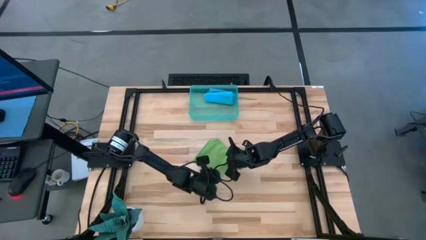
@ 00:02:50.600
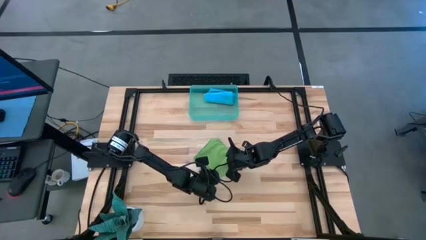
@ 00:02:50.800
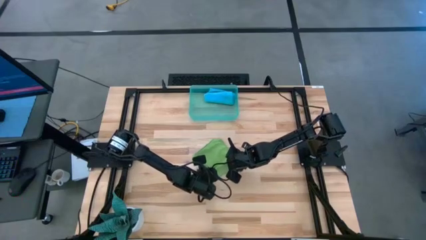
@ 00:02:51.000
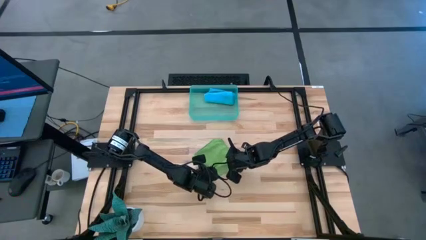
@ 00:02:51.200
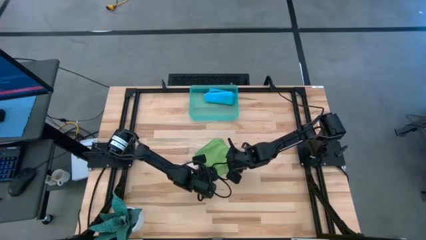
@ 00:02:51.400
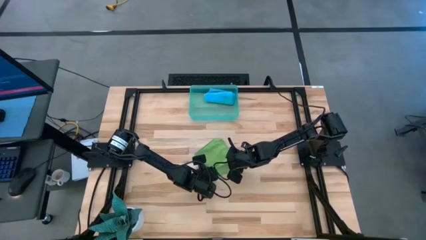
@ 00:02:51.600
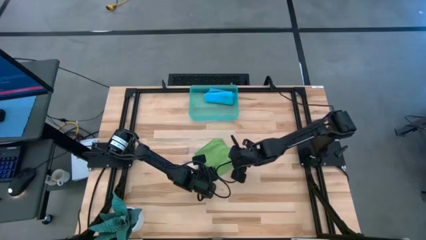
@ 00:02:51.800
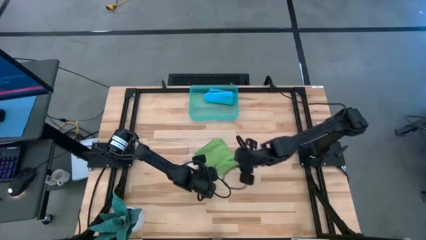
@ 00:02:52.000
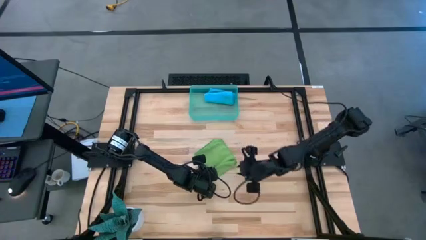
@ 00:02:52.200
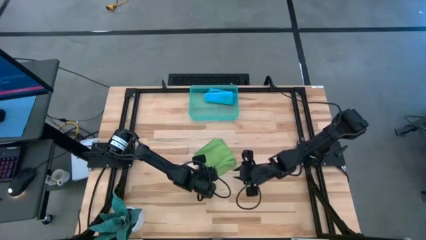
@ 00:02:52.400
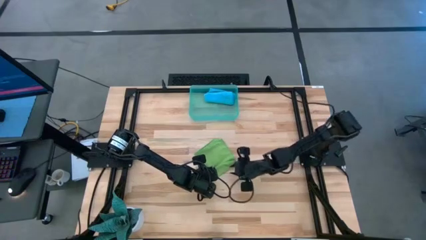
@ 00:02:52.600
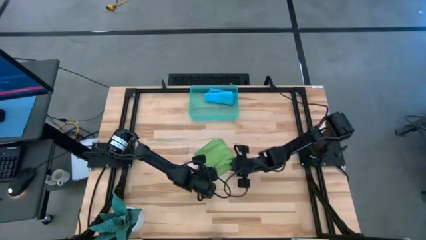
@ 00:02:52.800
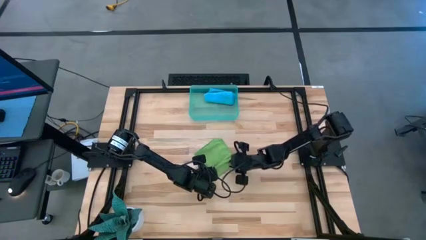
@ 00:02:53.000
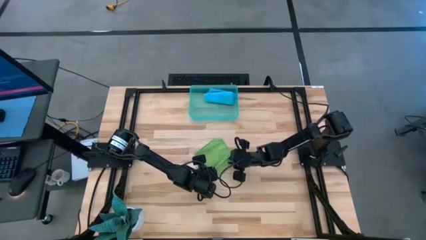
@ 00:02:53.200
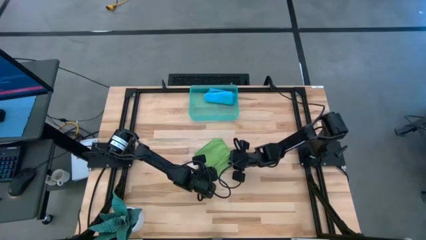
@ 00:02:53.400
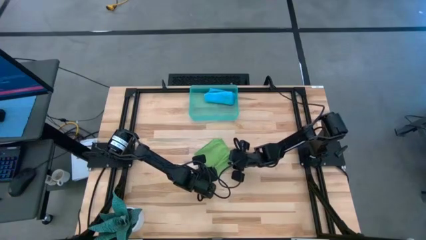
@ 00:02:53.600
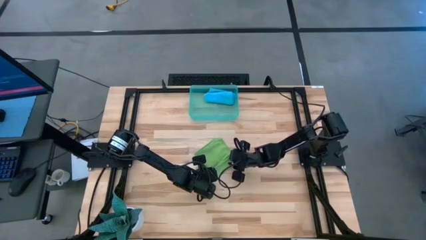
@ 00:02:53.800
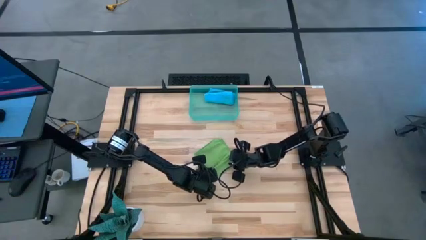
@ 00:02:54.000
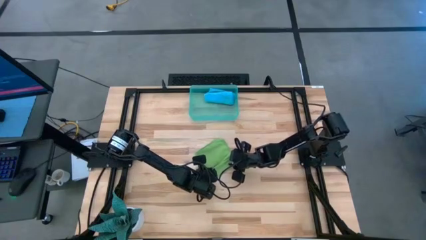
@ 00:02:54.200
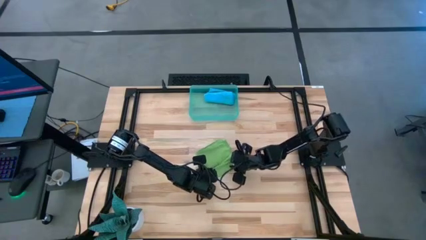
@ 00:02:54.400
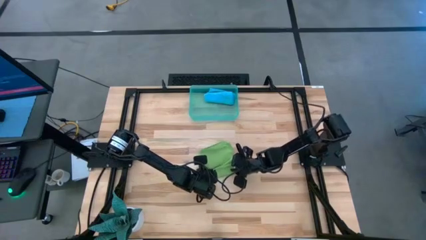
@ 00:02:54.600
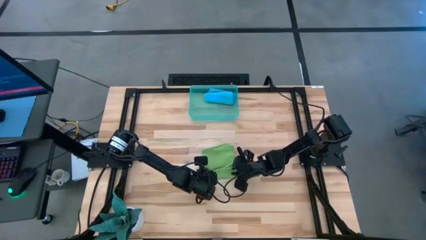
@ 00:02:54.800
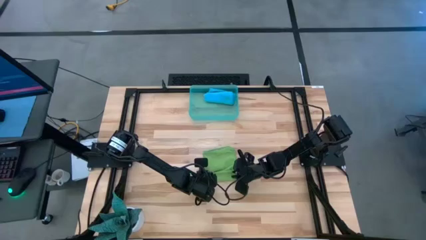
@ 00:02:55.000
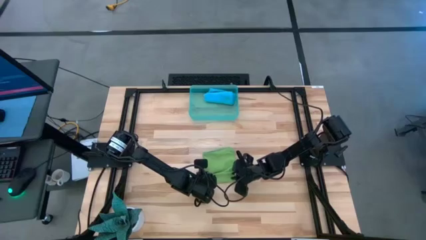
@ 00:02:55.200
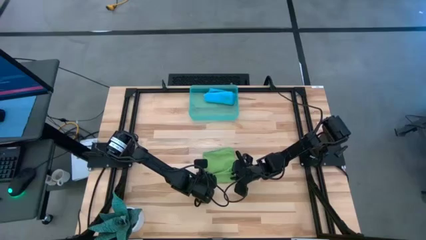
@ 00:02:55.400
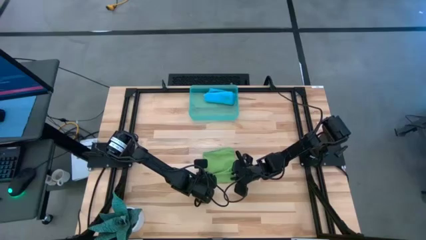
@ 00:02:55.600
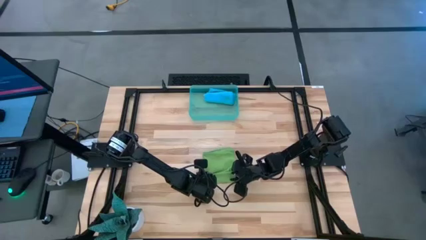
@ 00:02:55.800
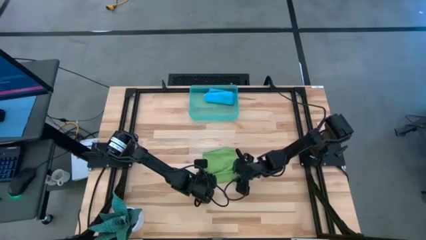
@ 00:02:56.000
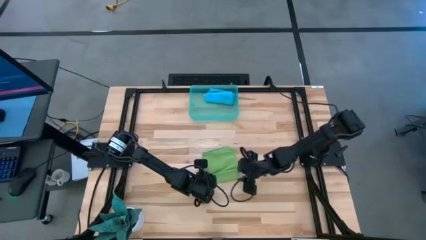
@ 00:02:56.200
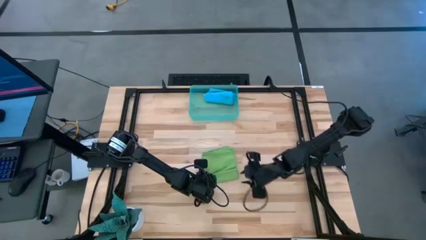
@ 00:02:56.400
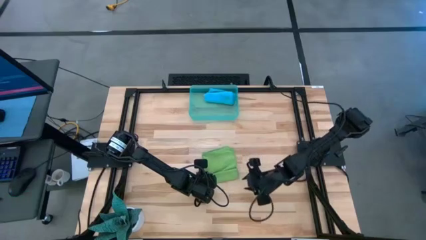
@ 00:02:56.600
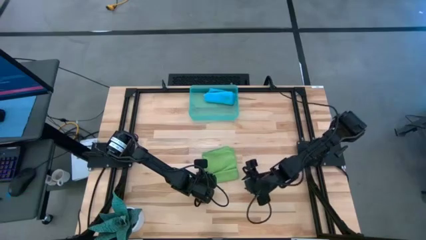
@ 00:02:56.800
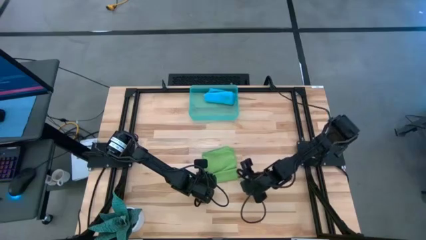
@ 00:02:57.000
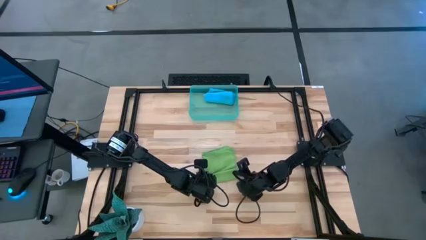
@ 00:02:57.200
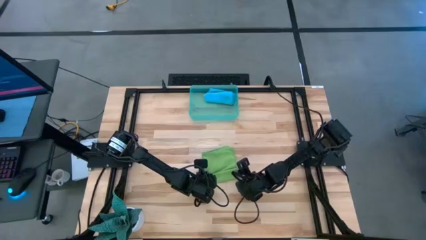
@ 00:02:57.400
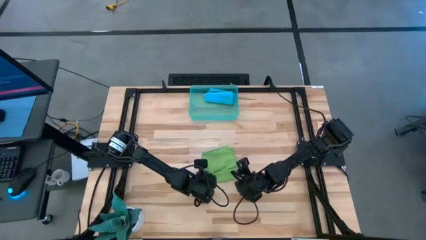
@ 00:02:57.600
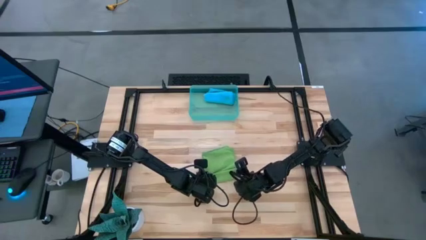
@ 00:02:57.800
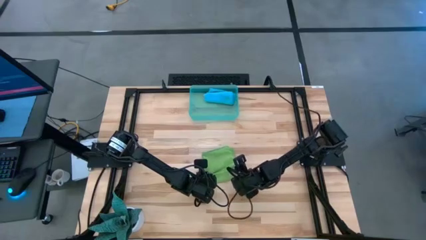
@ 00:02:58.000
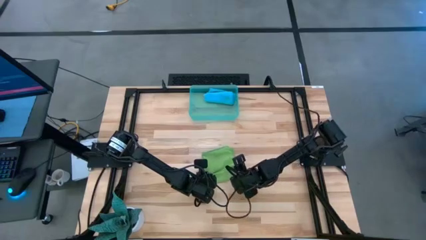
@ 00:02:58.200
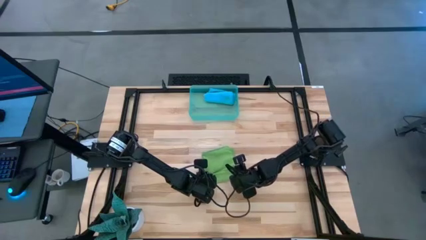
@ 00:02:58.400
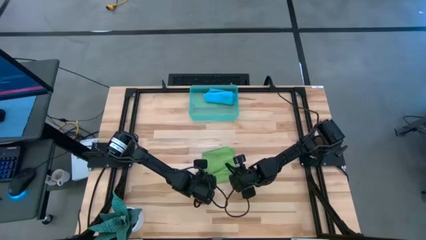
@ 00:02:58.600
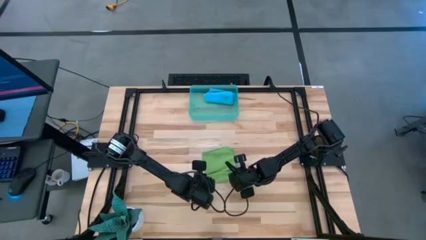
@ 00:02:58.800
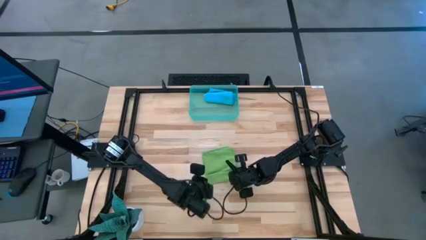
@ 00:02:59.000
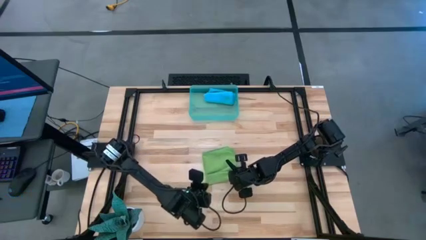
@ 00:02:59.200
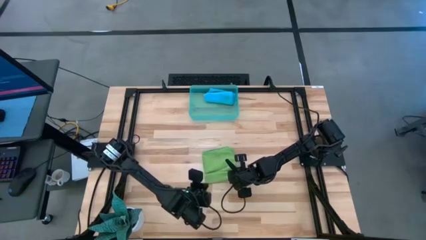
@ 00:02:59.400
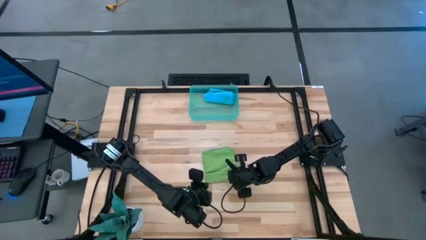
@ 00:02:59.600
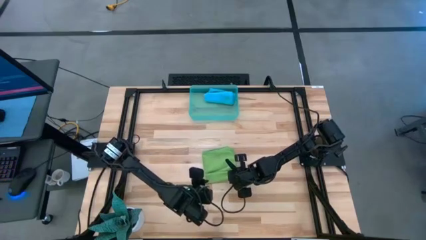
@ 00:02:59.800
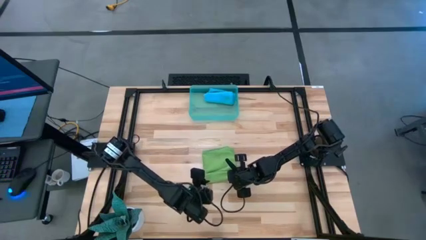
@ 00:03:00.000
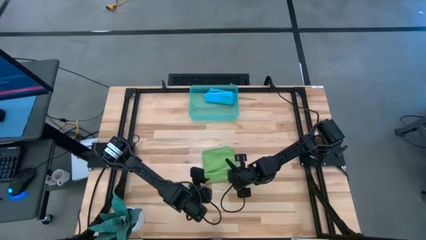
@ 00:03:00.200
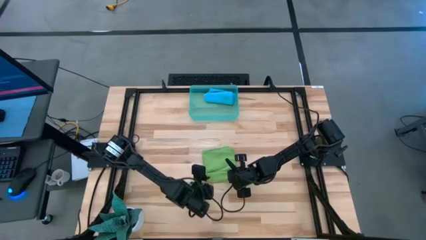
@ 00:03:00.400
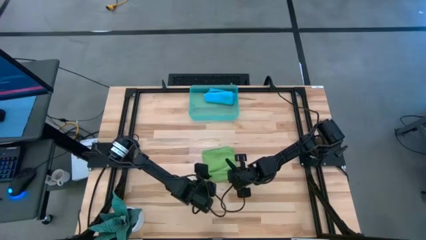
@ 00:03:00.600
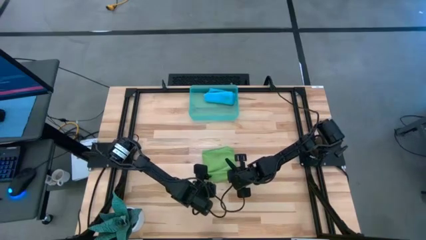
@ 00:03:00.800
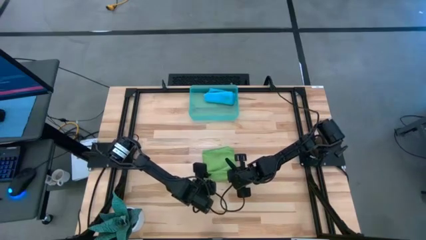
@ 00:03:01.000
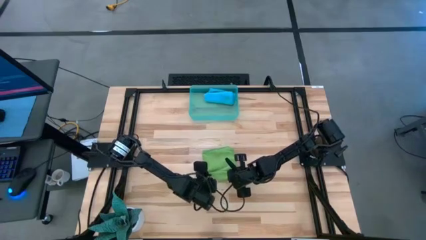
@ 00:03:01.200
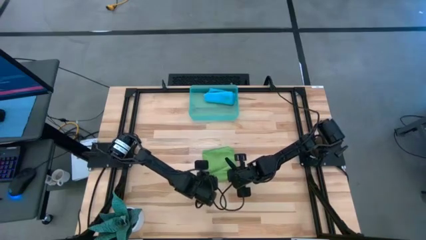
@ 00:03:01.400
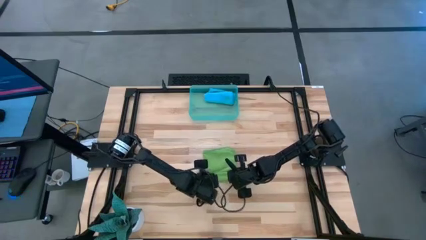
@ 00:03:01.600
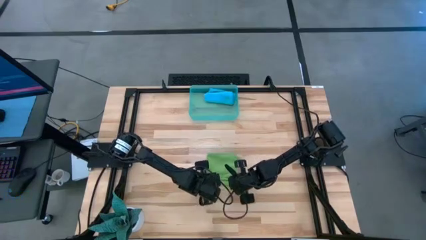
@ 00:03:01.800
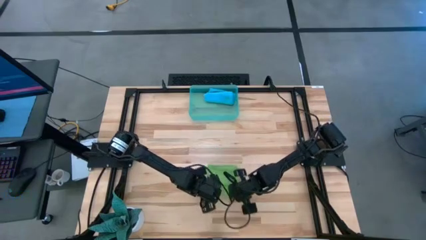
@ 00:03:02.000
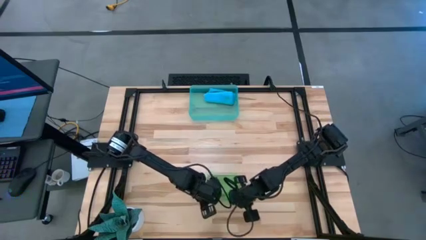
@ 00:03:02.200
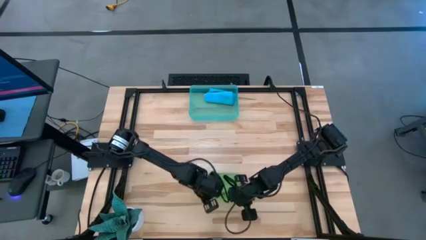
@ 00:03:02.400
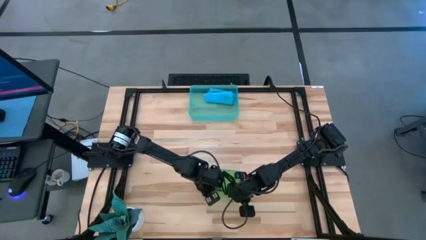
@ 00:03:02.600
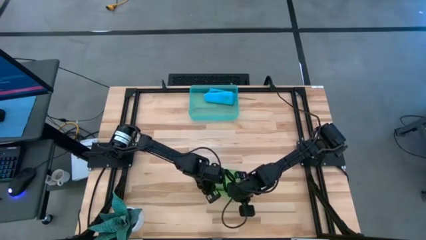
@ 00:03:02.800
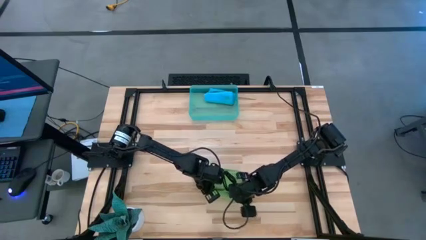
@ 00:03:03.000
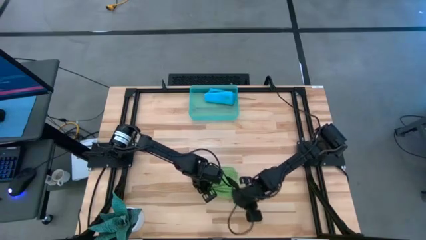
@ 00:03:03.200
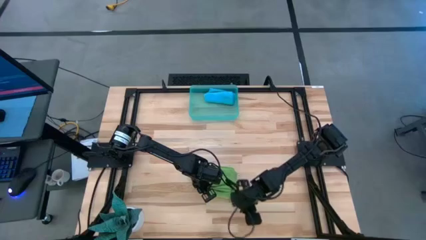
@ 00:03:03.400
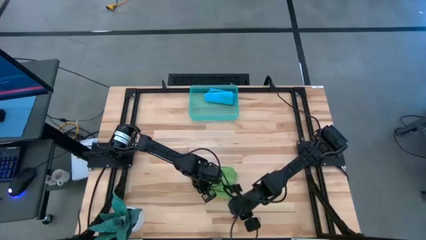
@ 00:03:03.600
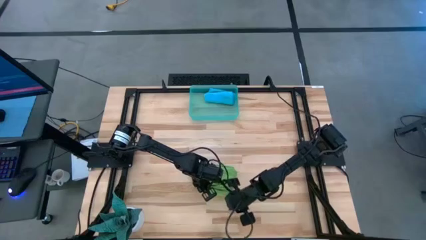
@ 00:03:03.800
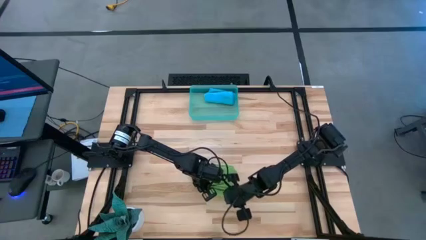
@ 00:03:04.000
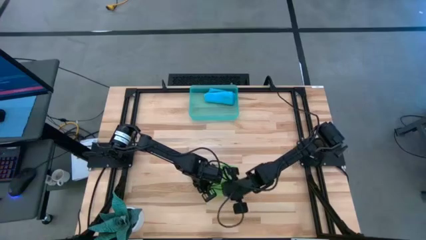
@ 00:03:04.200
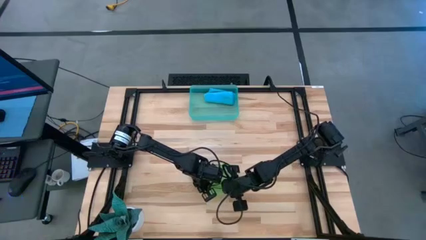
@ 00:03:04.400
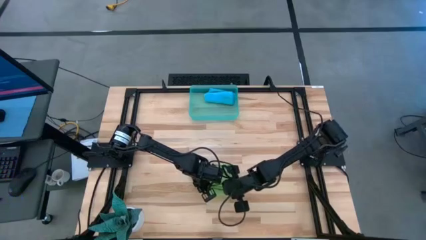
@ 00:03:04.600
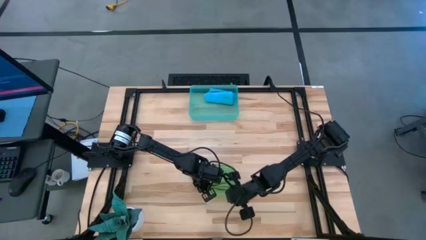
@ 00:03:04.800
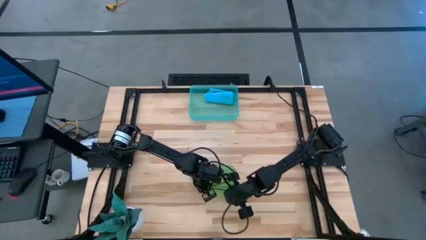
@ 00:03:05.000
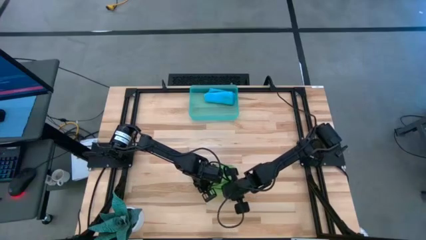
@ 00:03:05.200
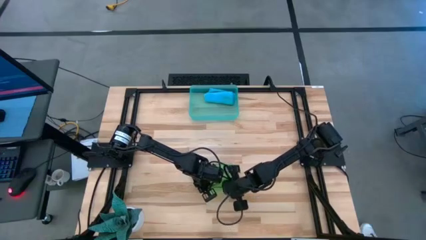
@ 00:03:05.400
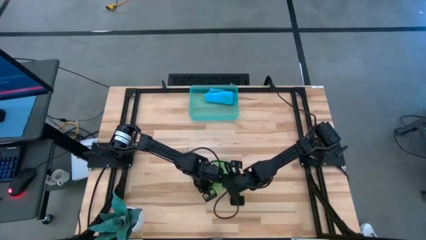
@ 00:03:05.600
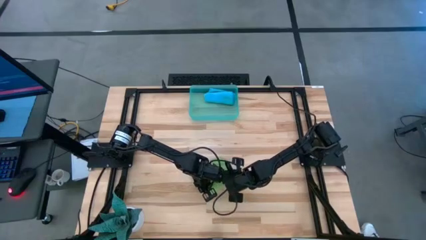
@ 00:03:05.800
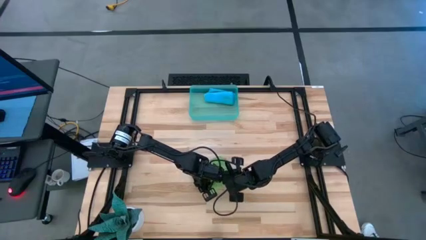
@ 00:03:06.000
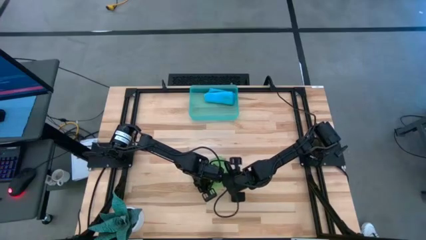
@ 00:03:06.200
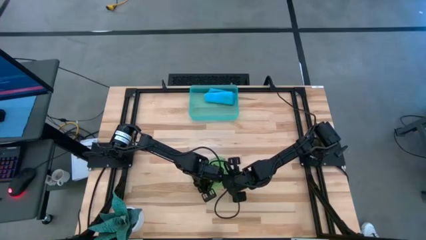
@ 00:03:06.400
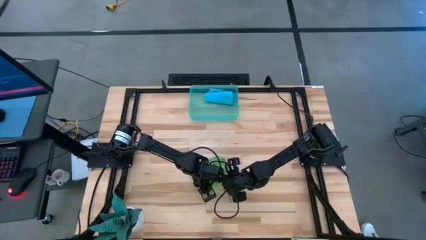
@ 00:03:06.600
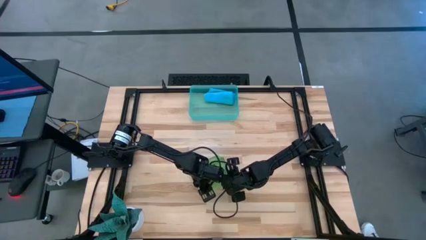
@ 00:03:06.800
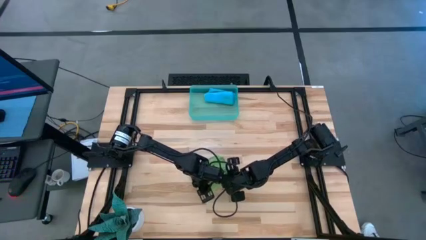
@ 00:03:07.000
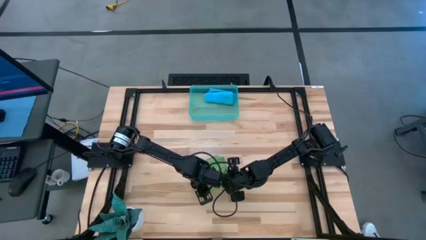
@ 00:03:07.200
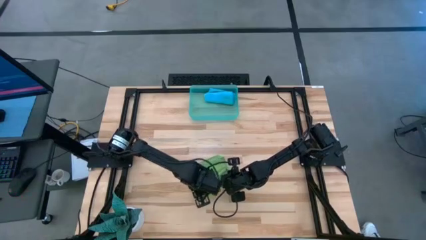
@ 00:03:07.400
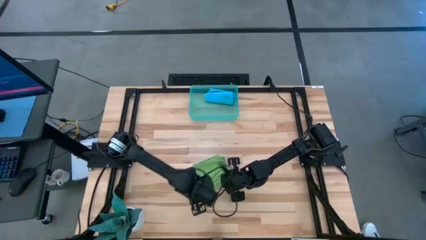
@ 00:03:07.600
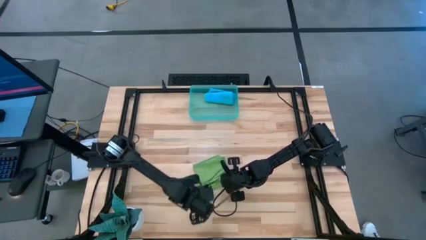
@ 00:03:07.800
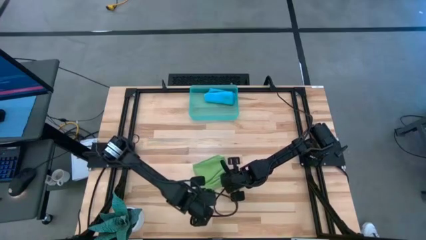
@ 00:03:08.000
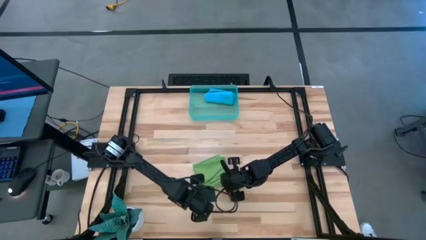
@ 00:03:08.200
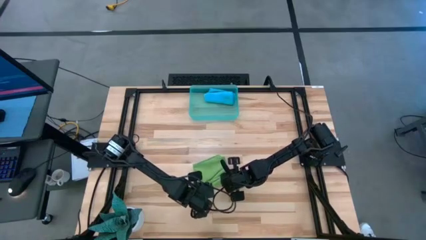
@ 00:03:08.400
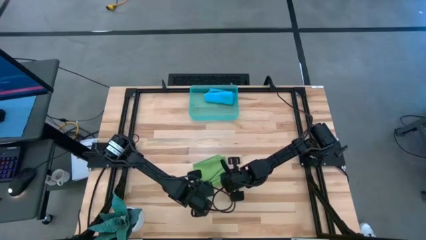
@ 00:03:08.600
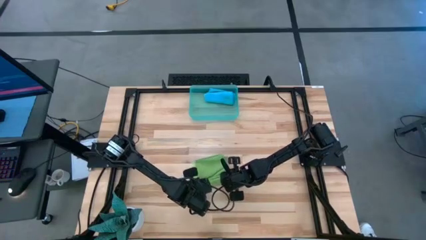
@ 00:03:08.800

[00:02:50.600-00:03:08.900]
Task: Roll microfiber towels into tight, uniform cylinder then place into a basket
Roll the green microfiber cloth
